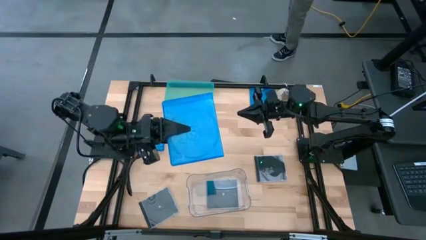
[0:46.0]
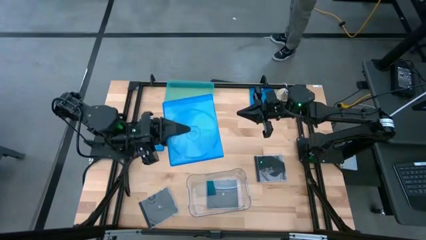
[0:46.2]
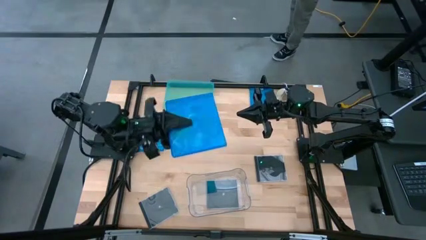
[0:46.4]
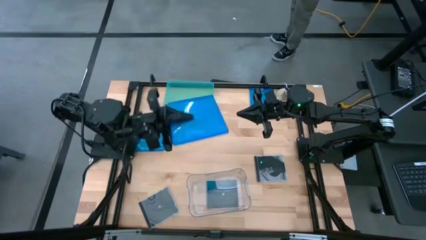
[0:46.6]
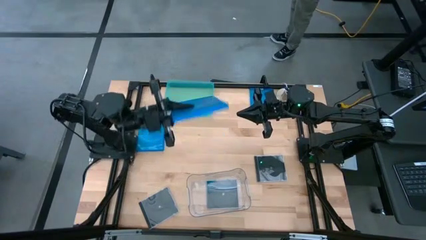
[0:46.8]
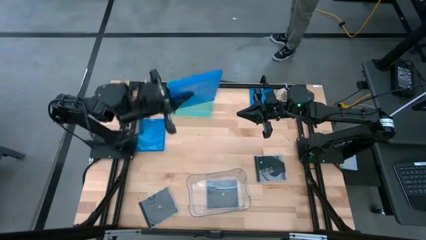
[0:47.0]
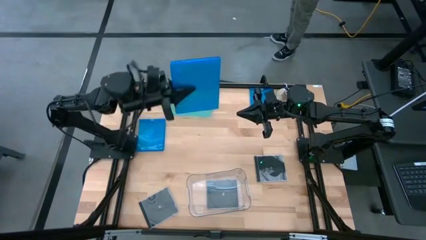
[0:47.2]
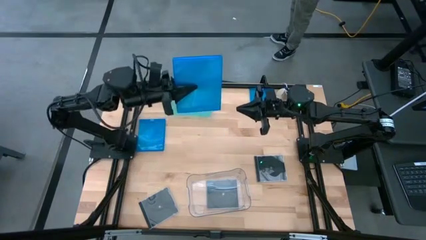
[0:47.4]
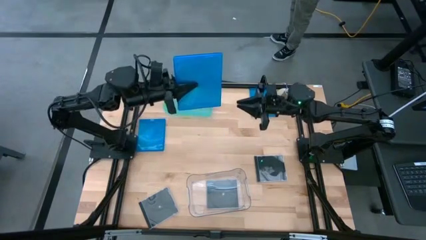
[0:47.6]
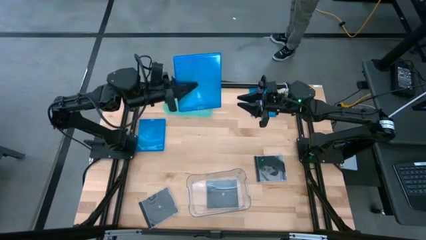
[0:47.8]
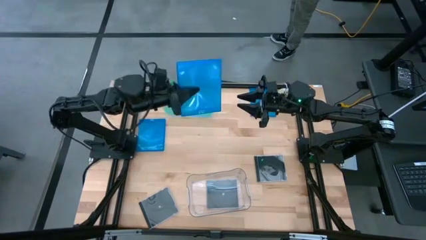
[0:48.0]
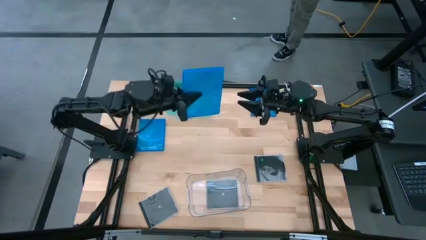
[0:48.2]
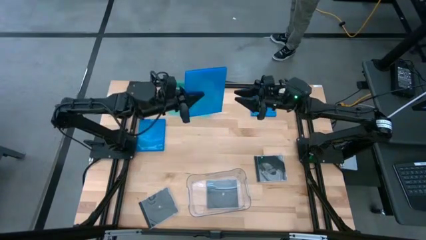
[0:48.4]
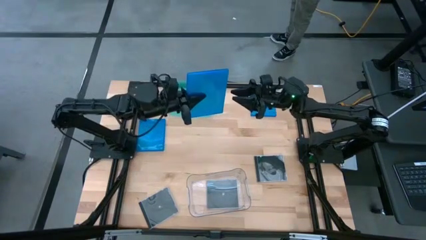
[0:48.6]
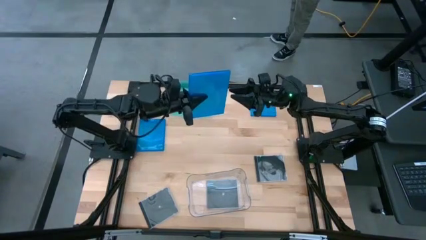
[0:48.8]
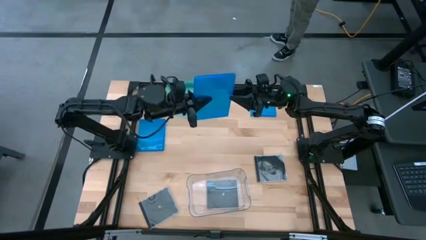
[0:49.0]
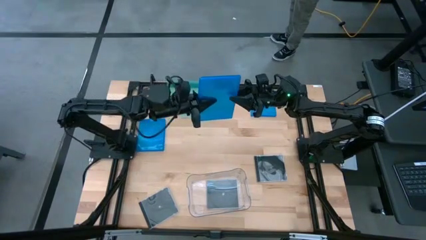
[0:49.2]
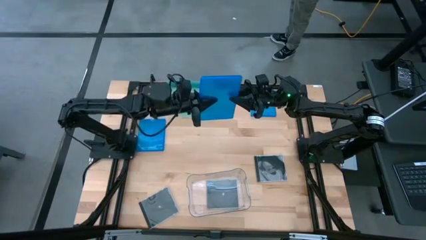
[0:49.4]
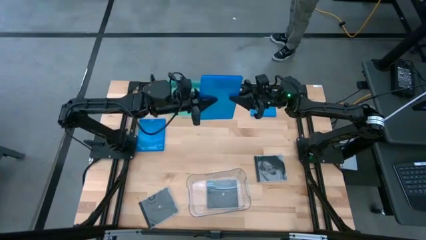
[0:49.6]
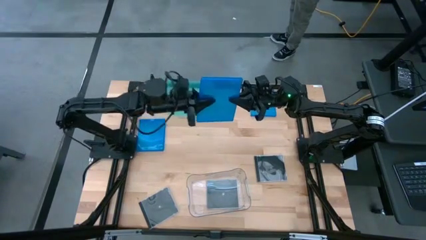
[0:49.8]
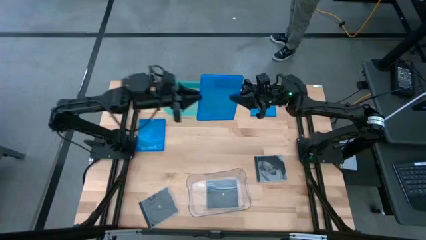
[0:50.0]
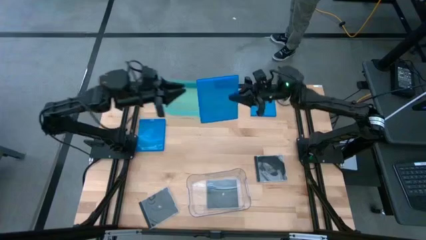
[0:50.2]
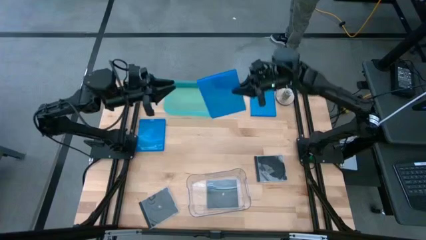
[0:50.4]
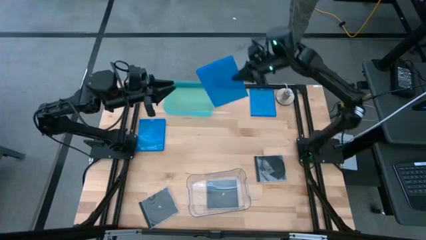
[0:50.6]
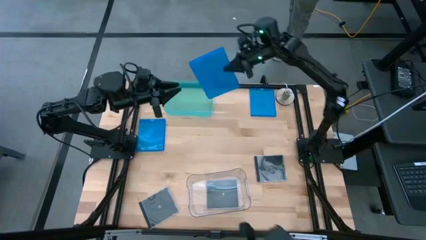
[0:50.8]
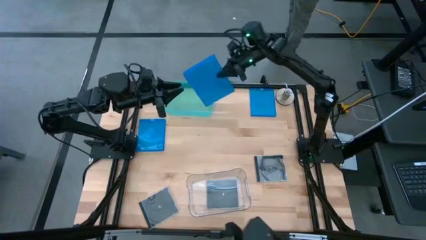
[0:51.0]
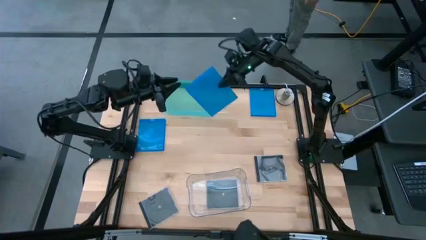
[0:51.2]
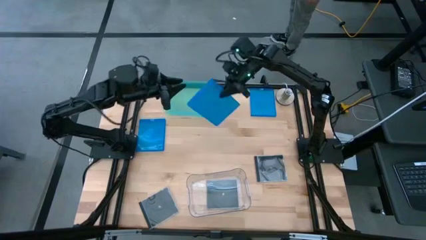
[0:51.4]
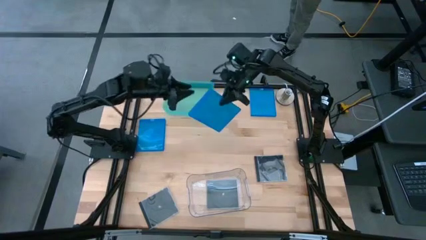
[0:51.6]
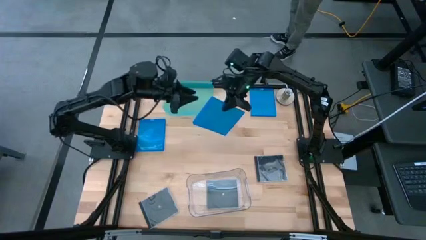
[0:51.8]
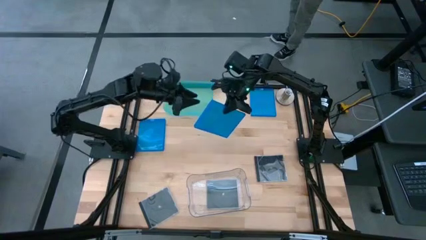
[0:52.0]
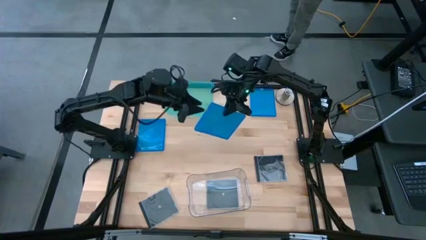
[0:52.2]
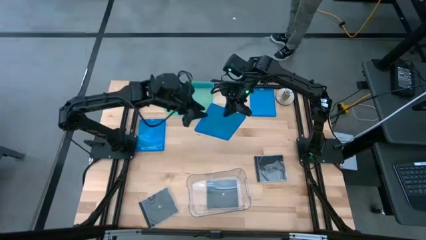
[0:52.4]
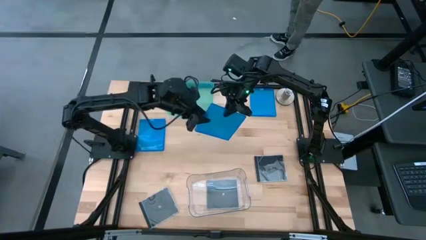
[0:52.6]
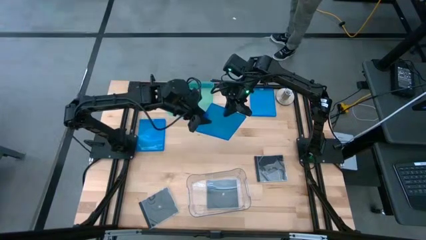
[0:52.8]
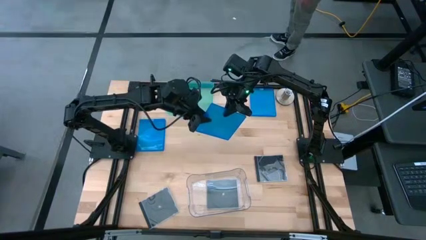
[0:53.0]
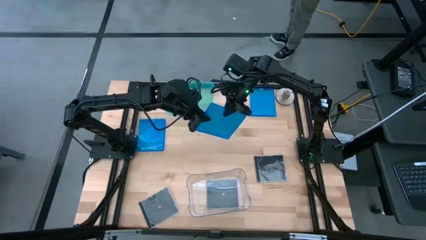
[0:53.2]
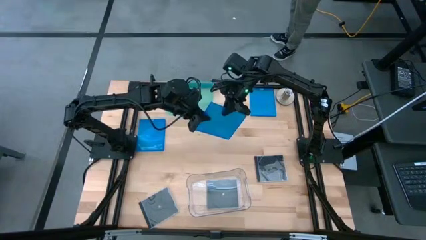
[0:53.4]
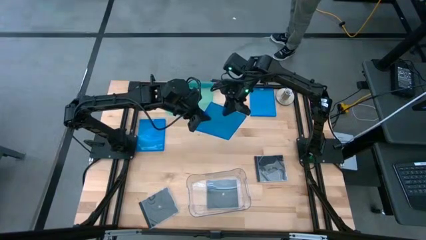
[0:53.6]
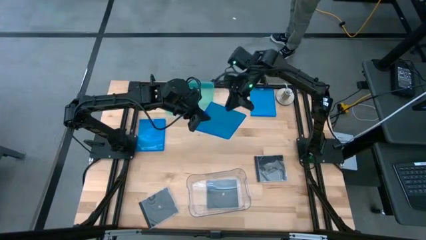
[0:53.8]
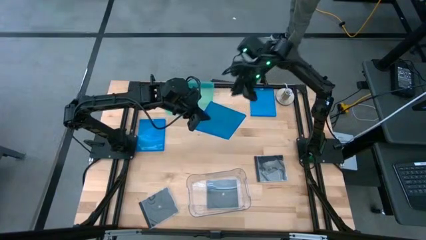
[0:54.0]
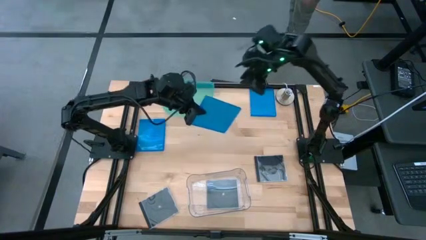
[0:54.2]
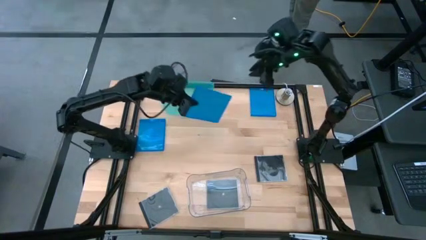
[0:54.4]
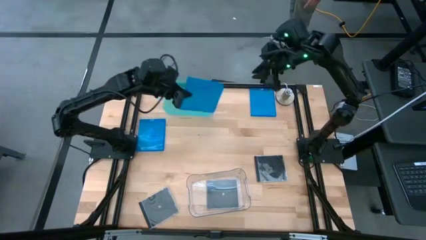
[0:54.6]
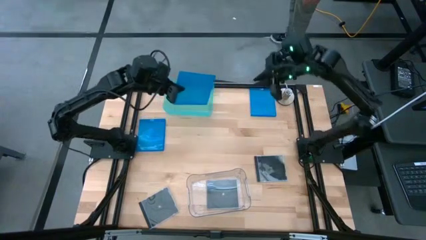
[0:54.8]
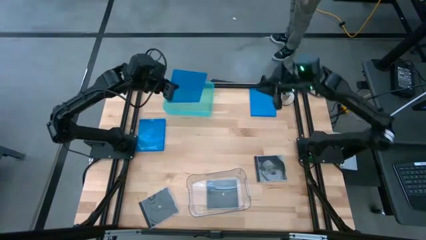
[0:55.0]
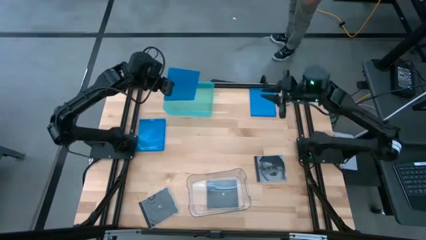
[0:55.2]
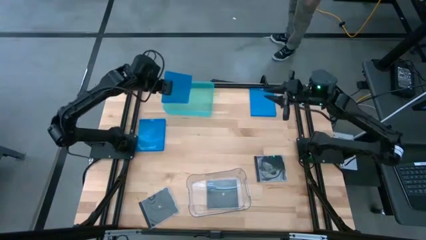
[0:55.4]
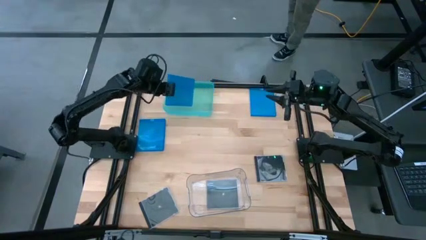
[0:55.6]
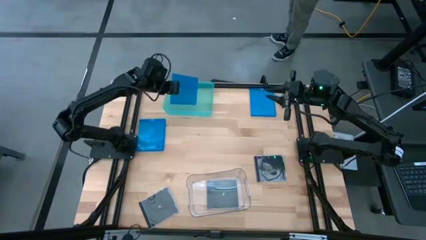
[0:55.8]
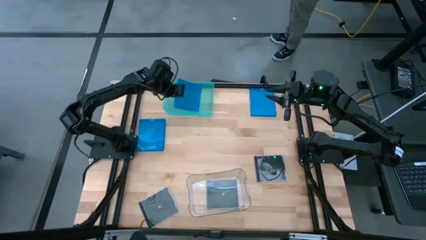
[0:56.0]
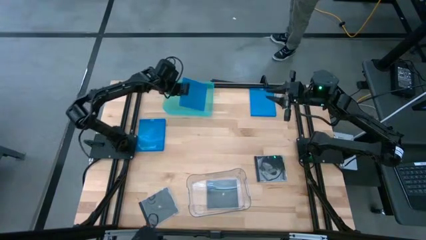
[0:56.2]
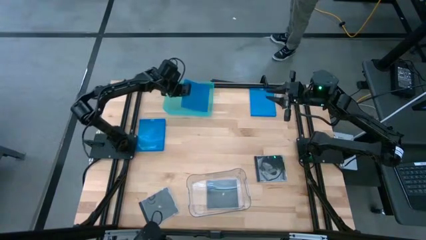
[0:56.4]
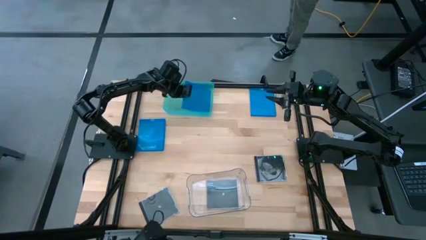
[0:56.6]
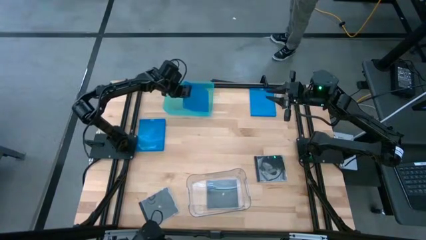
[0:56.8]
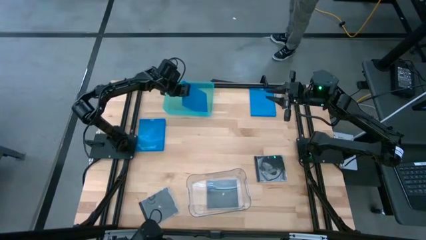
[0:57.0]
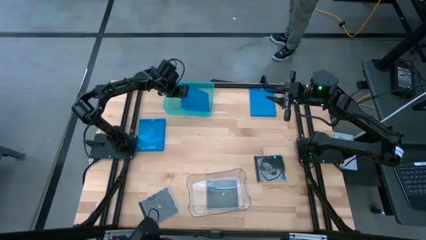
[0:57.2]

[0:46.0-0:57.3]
Task: Pick & place jewel cases by type
Put the bottom right blue CD case into the green bin

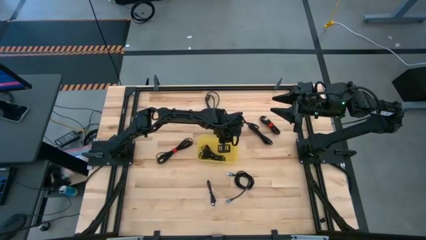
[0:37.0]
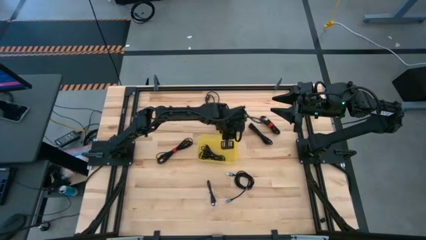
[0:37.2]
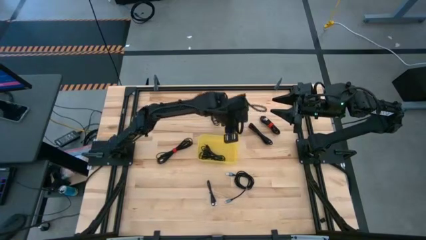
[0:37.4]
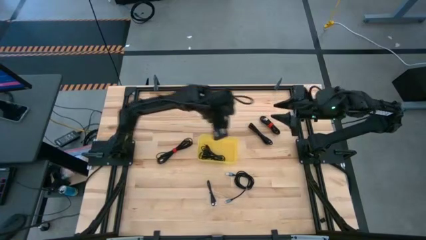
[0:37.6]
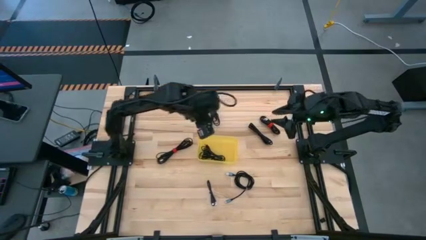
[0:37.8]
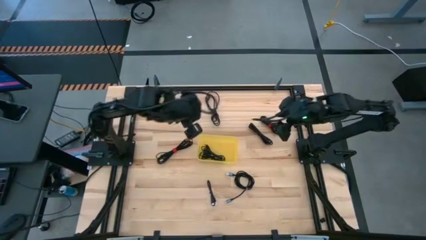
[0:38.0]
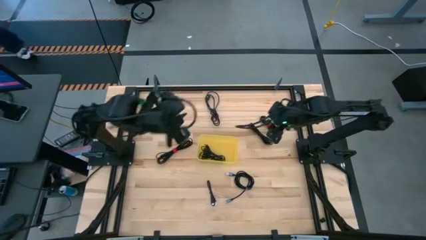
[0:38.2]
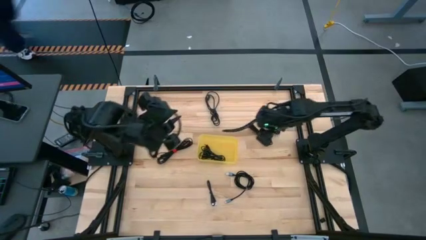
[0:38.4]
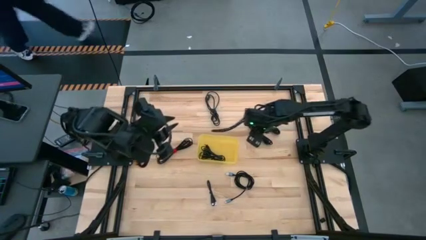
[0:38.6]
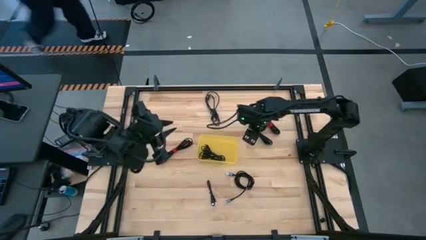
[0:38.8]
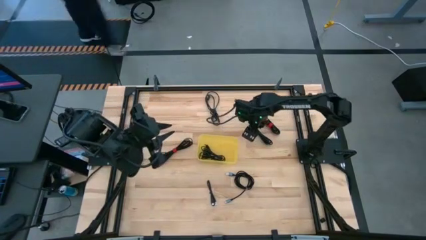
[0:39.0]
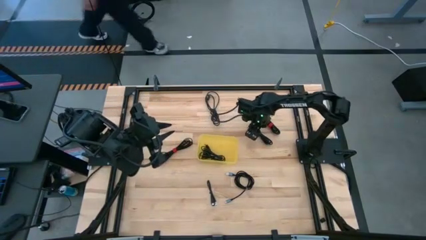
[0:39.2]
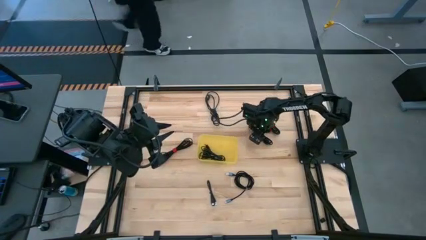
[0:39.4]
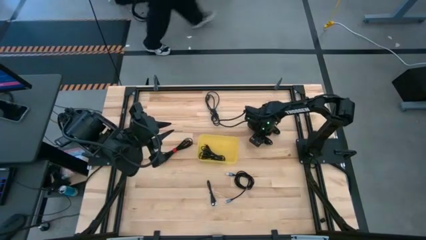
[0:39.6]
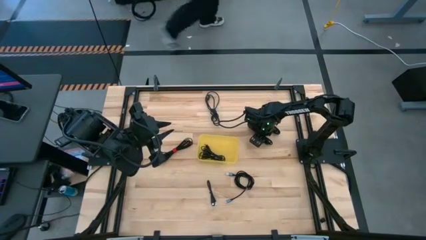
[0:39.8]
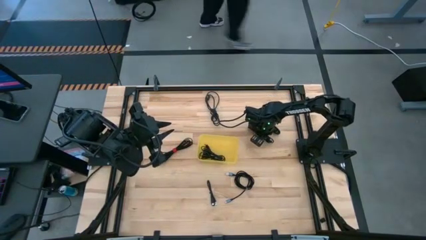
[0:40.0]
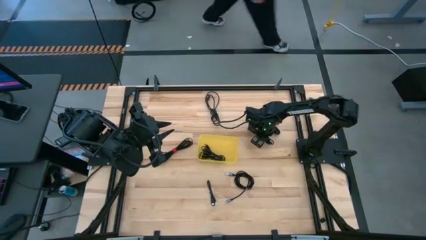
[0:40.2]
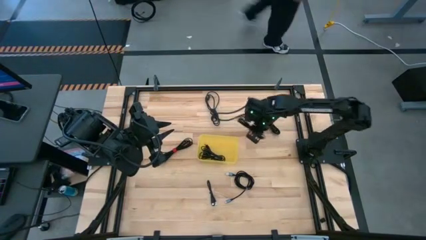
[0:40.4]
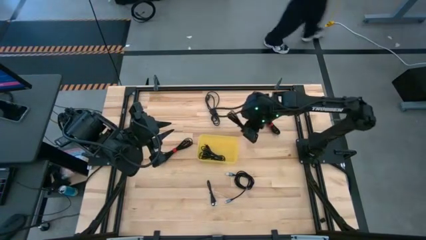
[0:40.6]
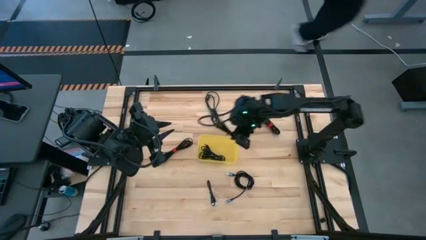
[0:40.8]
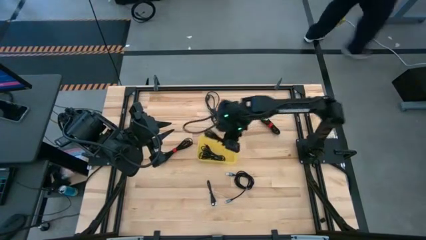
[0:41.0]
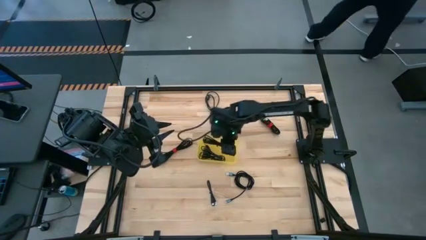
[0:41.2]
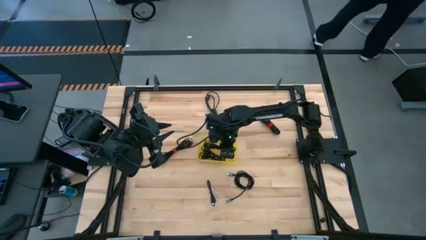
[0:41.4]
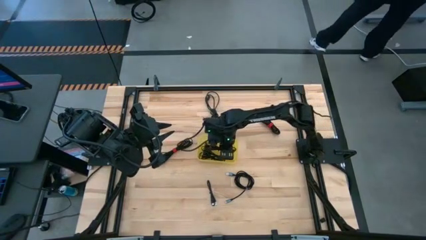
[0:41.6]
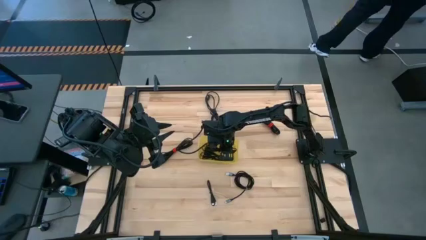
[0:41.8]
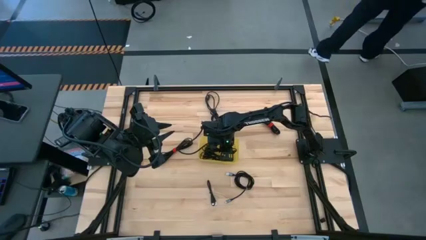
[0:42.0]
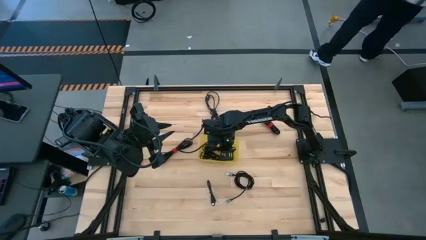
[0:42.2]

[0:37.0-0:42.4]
Task: Pick and place USB-C Cables
Put the black charger cable into the yellow bin
